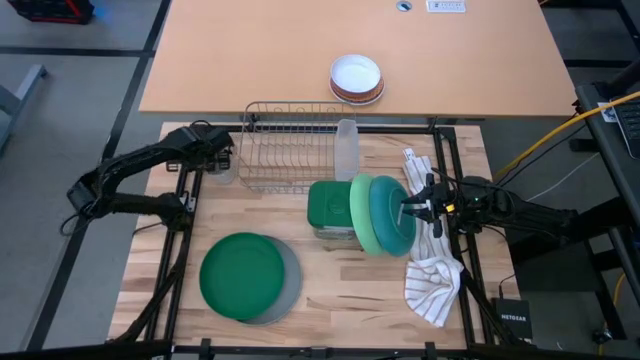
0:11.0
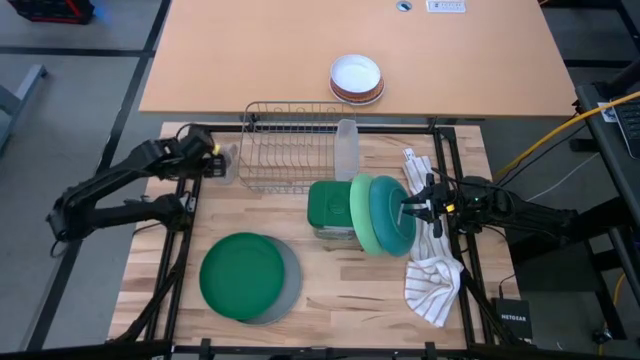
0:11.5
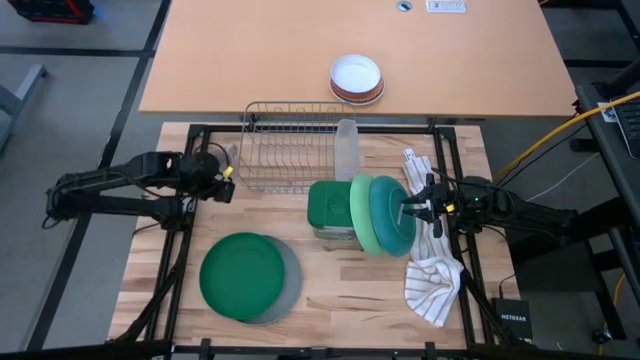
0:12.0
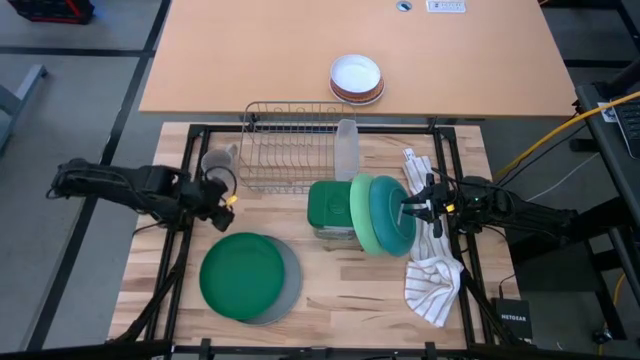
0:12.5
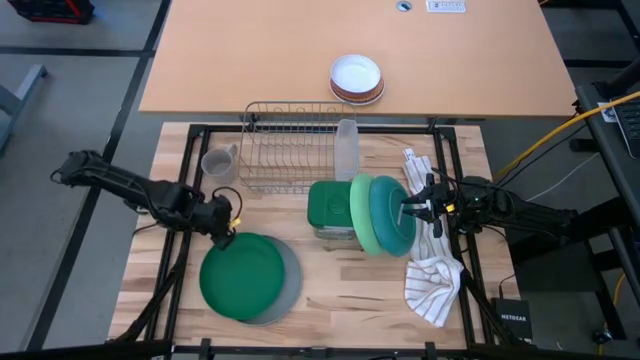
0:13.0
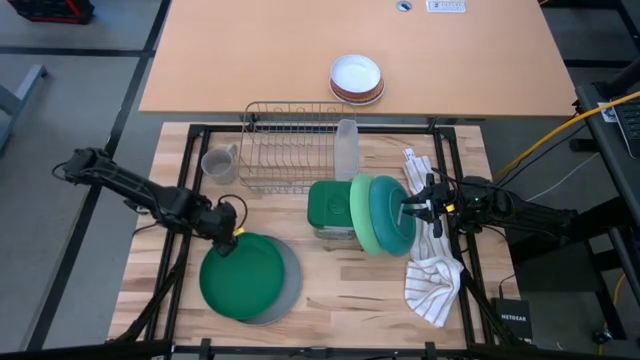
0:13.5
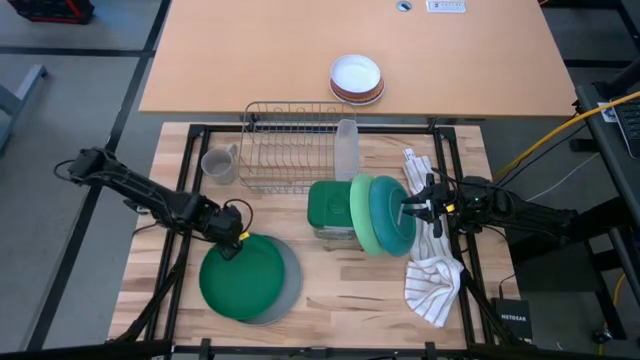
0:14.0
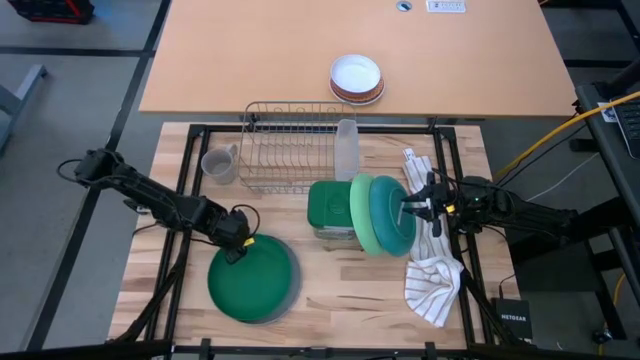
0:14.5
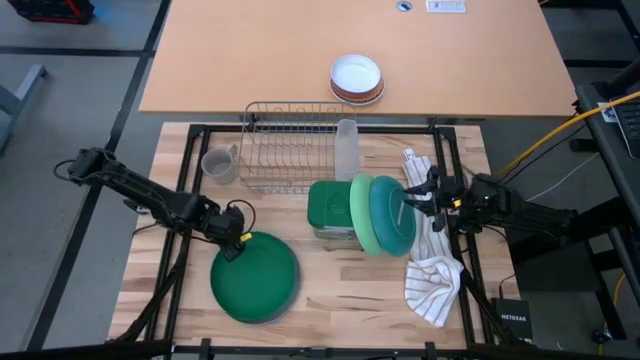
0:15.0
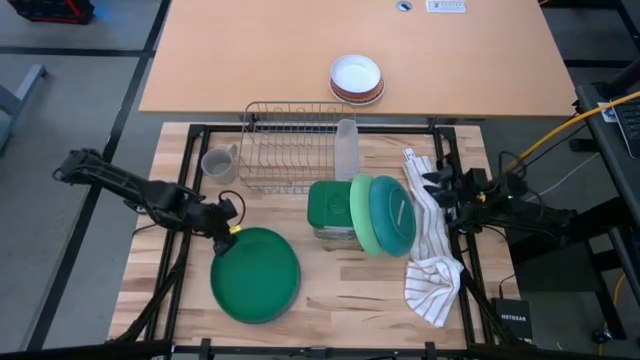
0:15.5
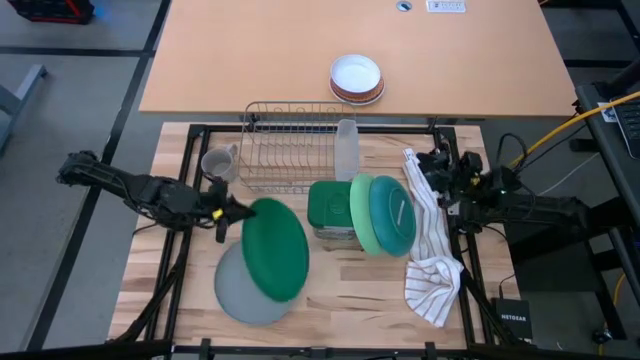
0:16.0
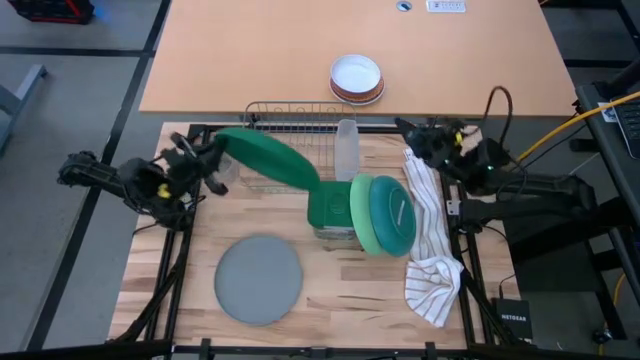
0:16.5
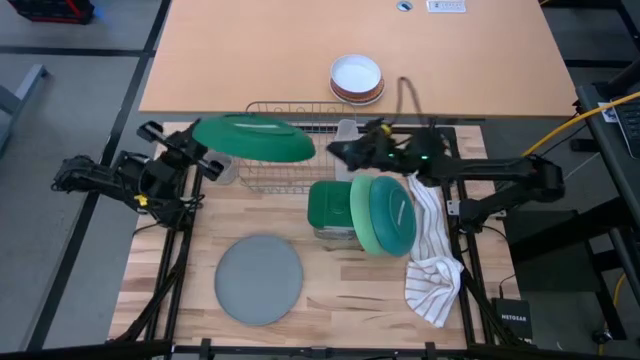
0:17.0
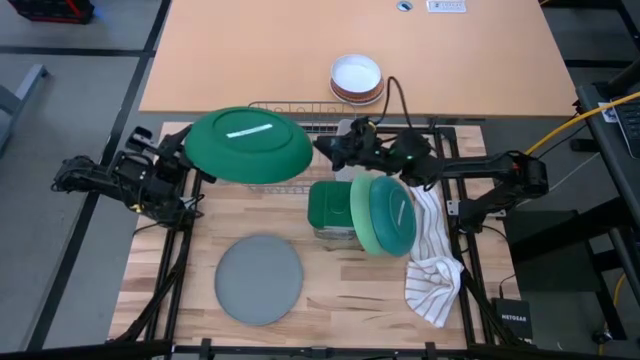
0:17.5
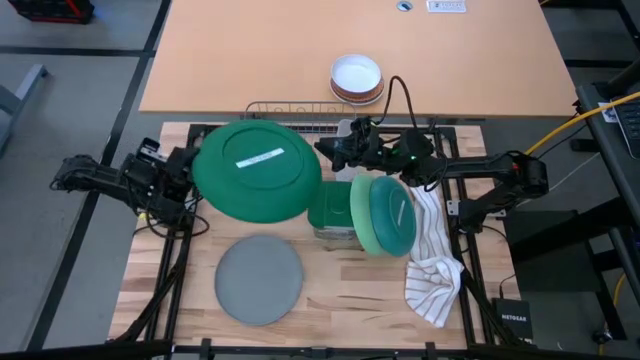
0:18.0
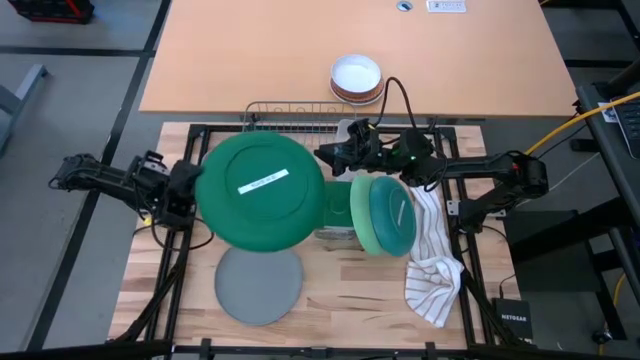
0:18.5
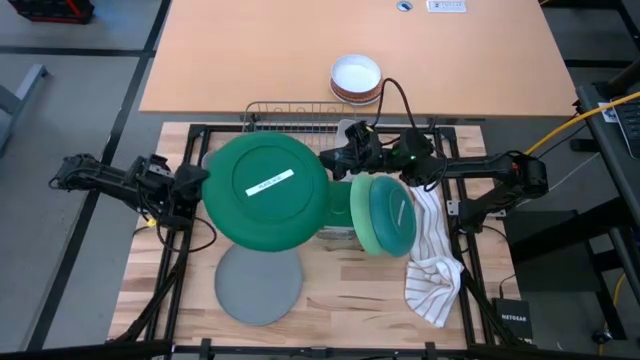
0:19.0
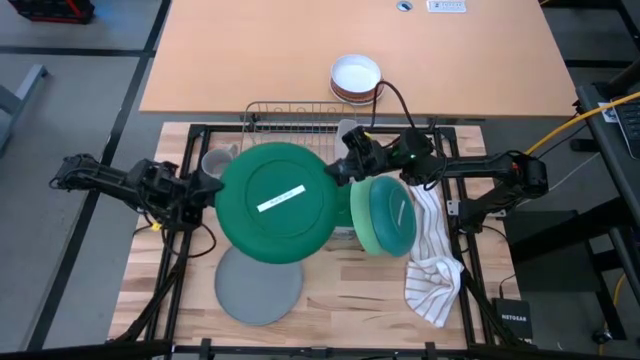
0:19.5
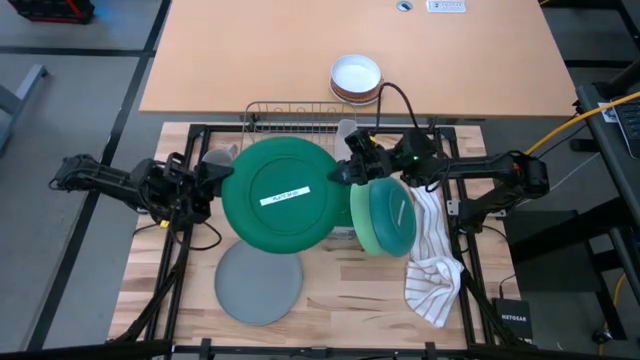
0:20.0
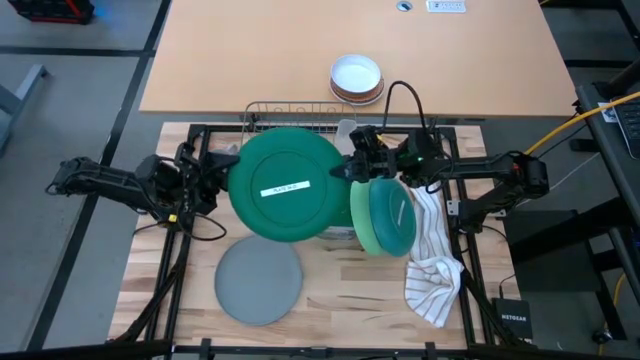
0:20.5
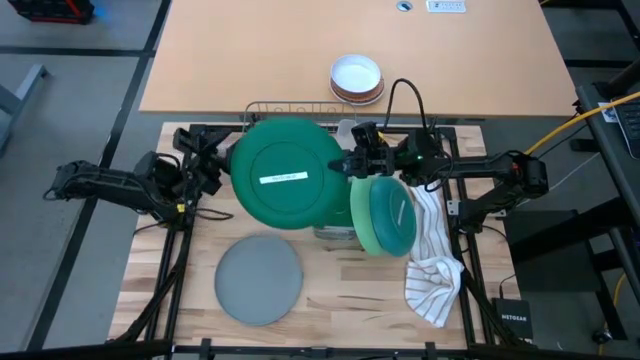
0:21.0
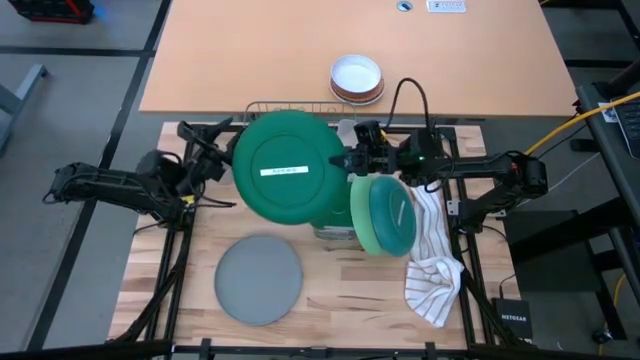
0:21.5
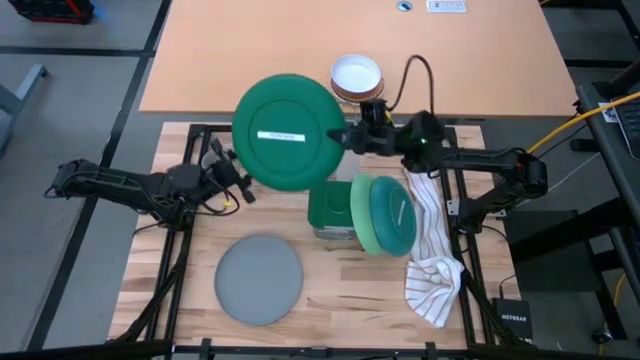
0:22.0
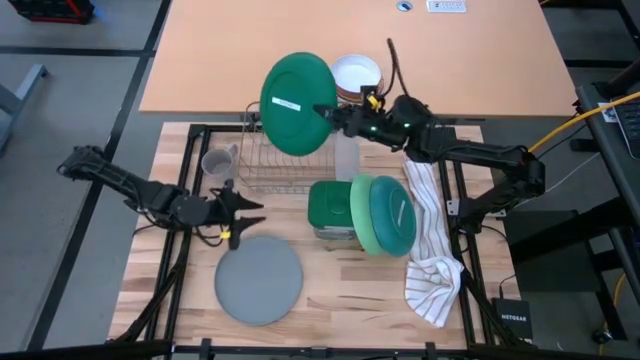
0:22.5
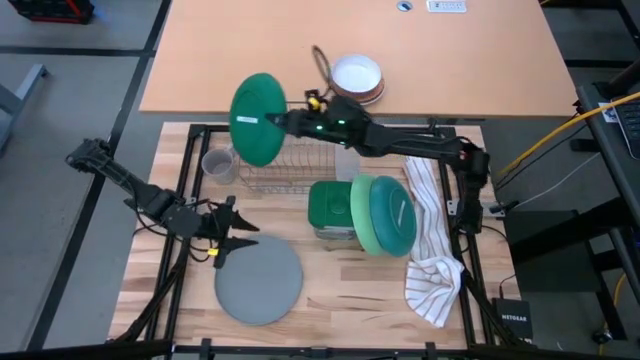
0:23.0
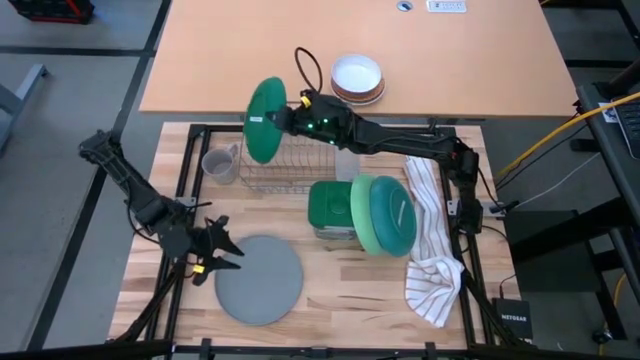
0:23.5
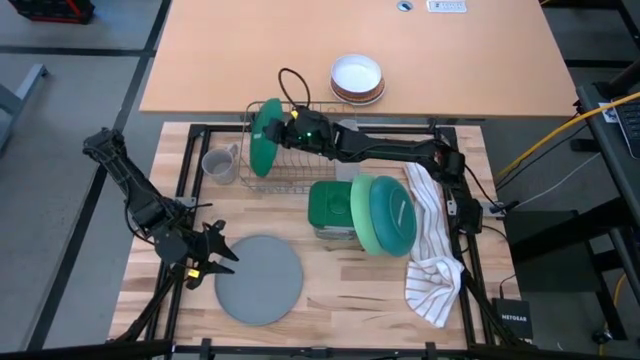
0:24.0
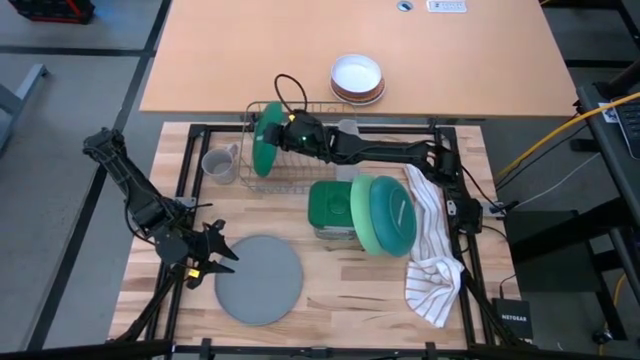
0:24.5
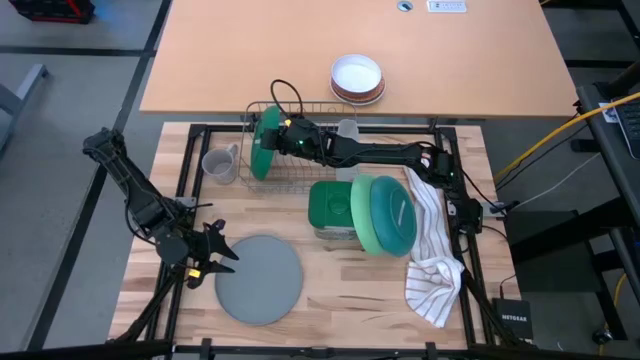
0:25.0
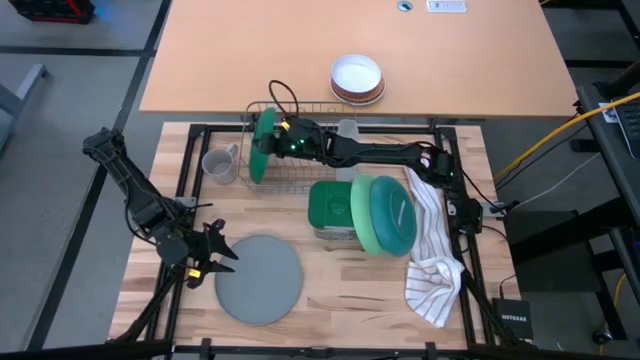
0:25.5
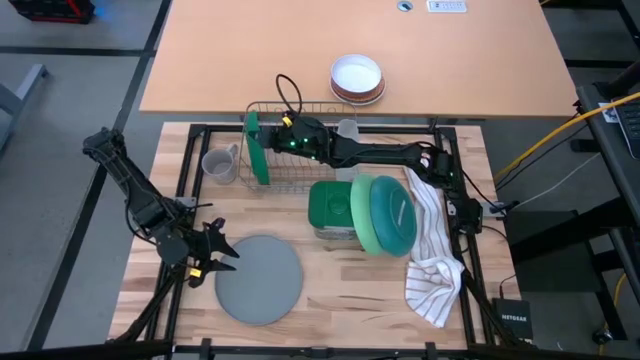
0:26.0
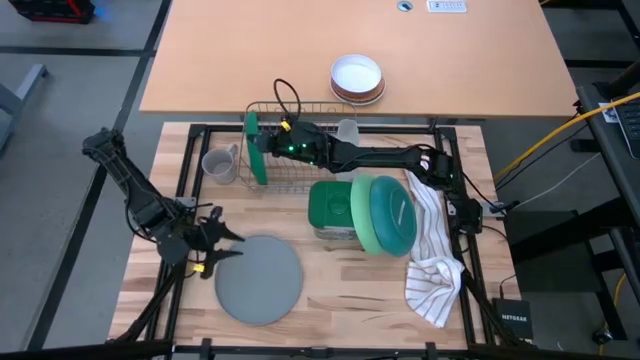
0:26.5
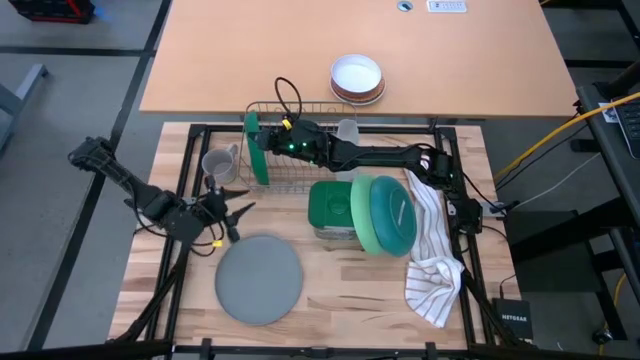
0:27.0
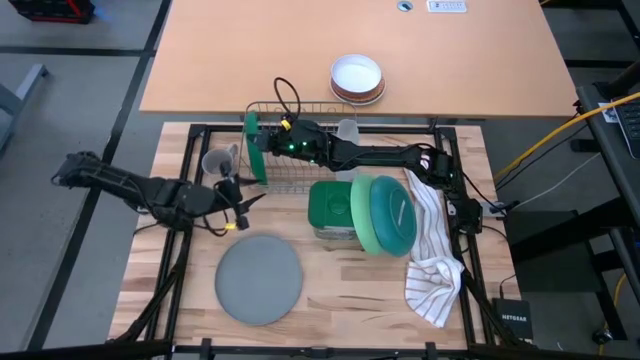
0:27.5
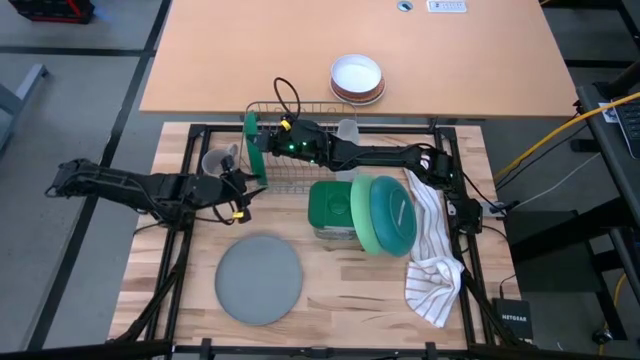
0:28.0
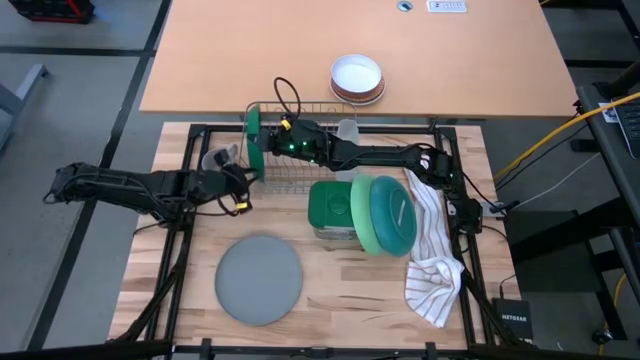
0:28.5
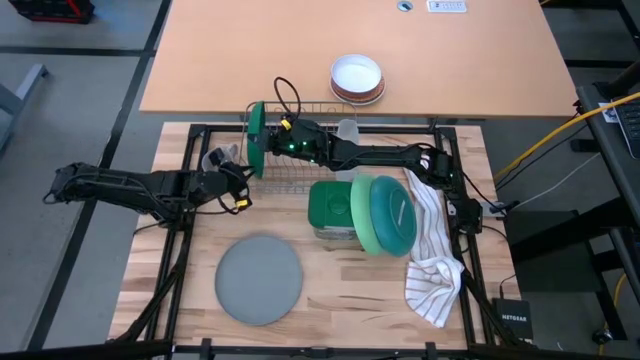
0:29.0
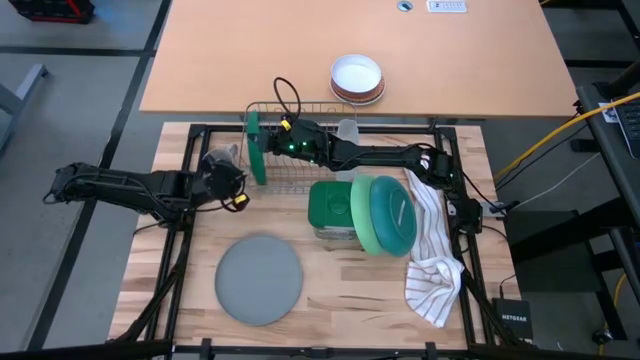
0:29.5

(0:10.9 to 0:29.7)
Task: Sort dishes
Put the green plate into the dish rack
